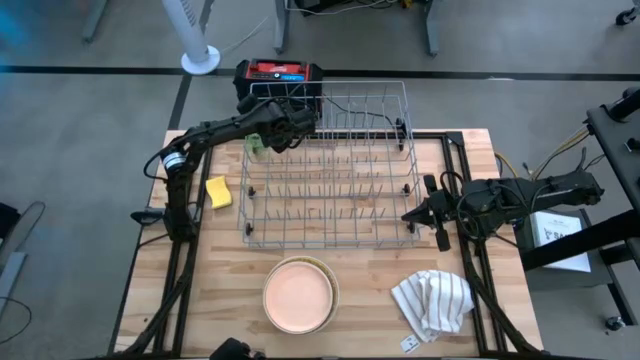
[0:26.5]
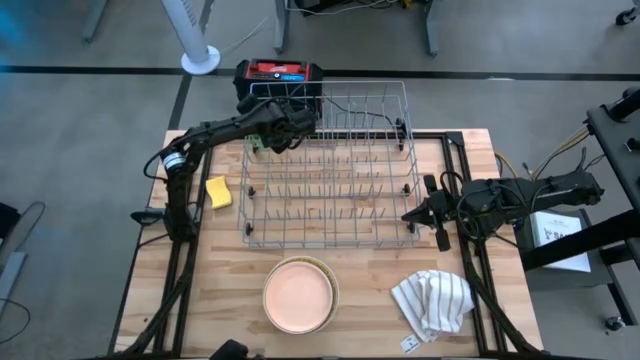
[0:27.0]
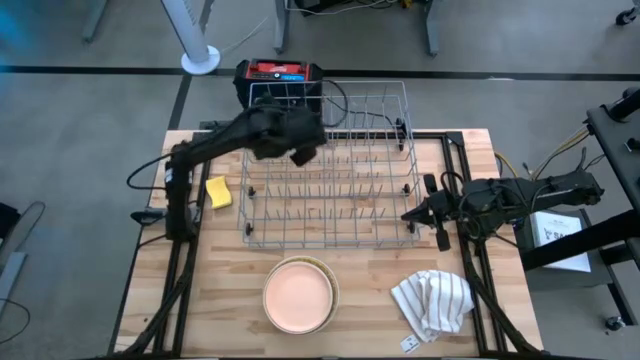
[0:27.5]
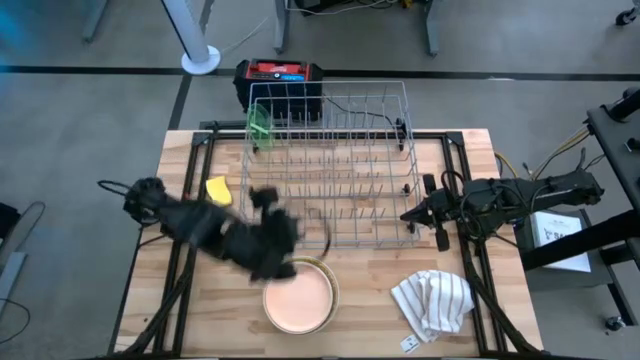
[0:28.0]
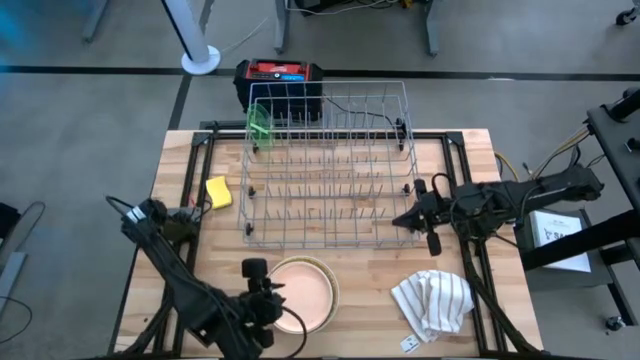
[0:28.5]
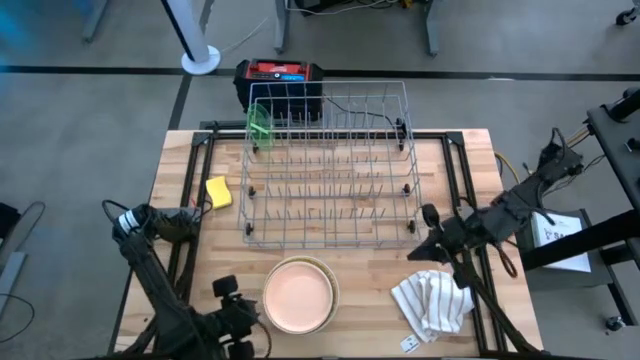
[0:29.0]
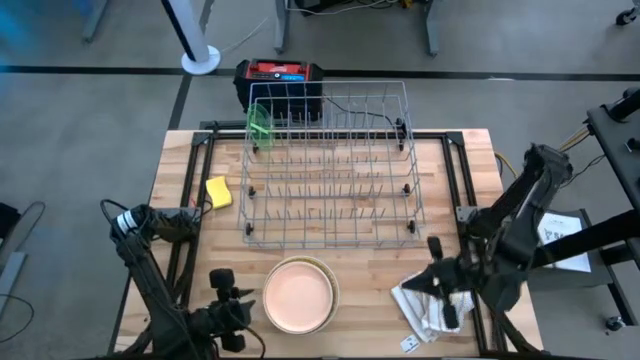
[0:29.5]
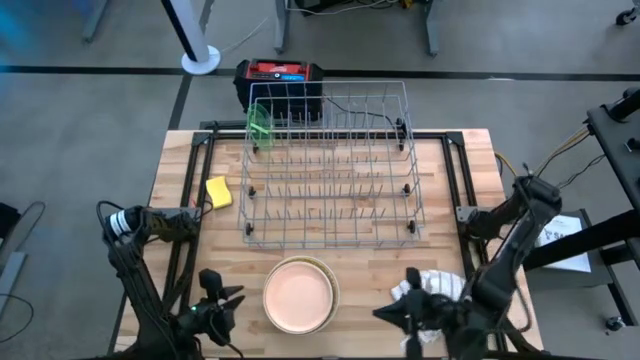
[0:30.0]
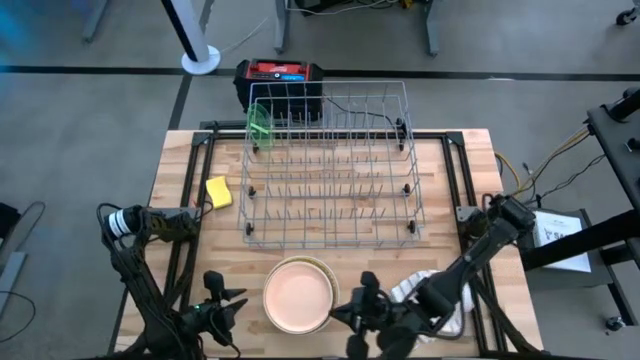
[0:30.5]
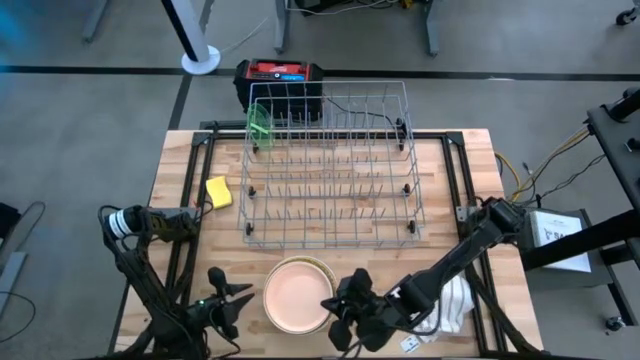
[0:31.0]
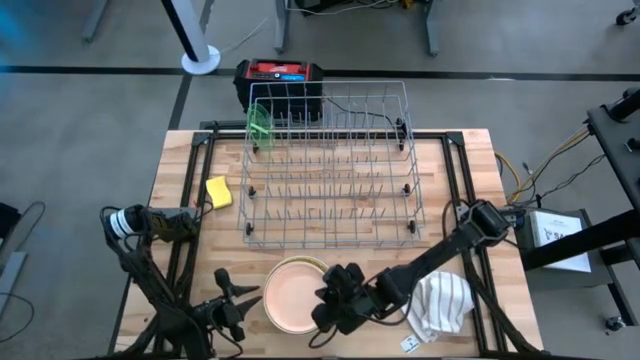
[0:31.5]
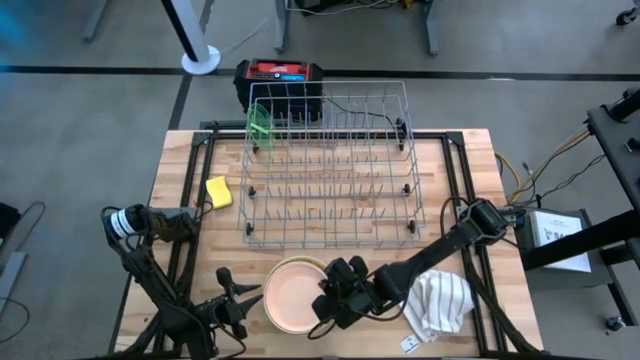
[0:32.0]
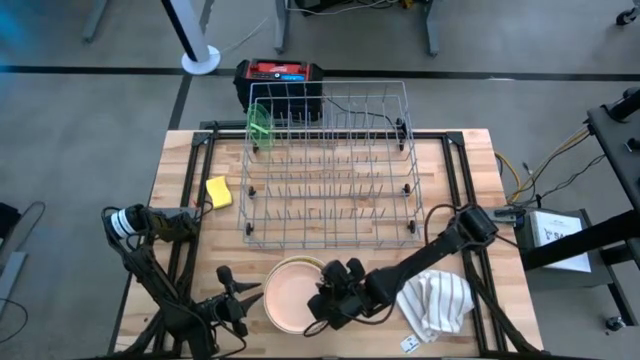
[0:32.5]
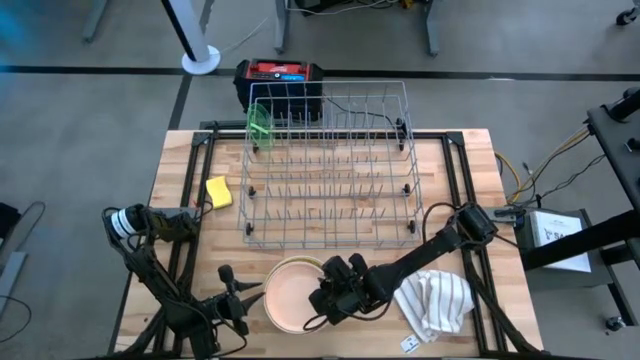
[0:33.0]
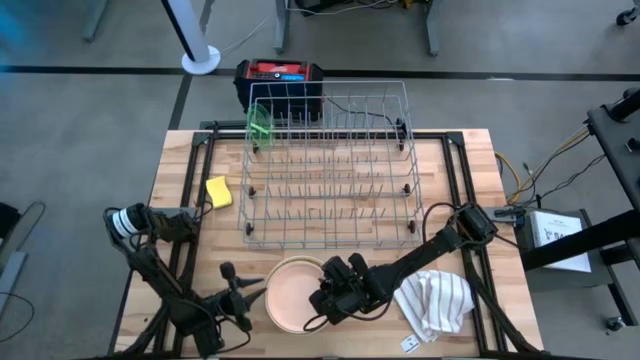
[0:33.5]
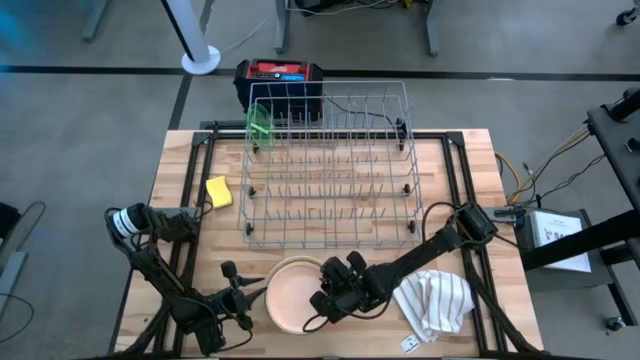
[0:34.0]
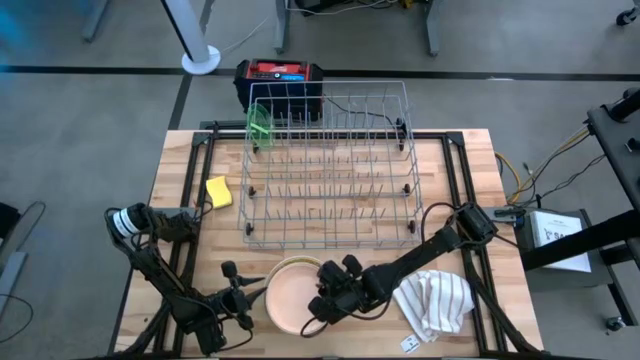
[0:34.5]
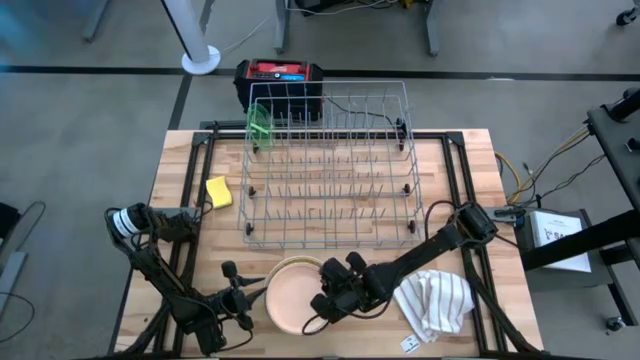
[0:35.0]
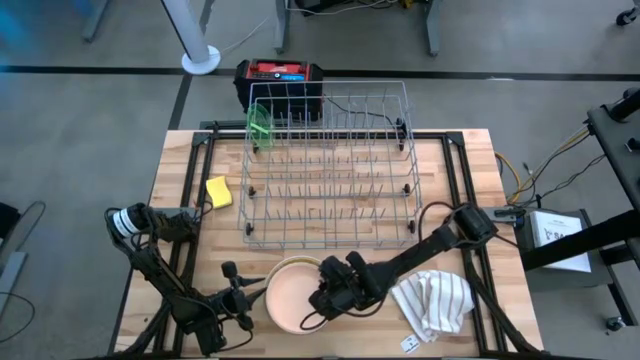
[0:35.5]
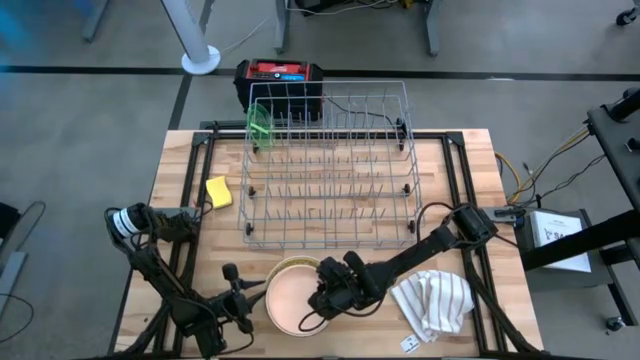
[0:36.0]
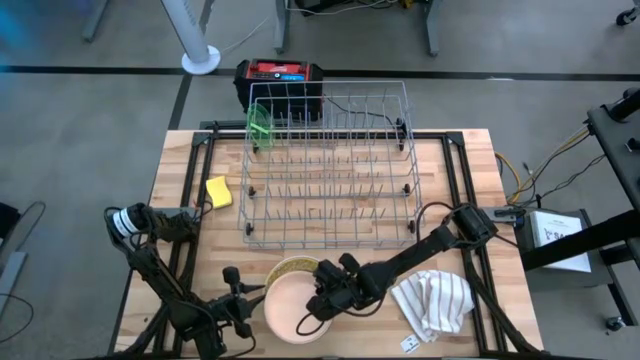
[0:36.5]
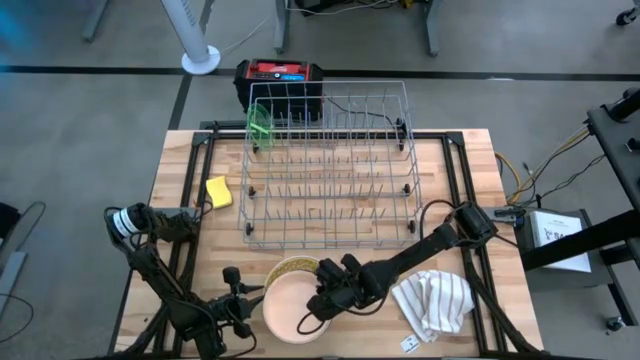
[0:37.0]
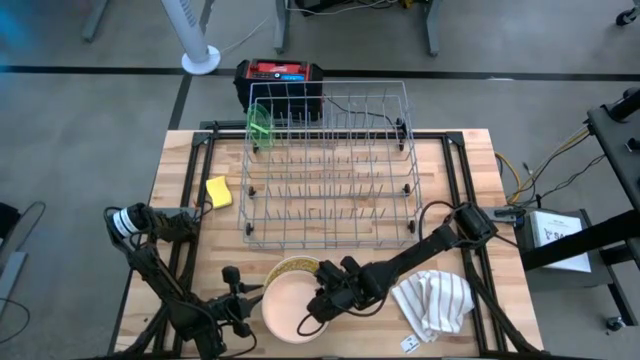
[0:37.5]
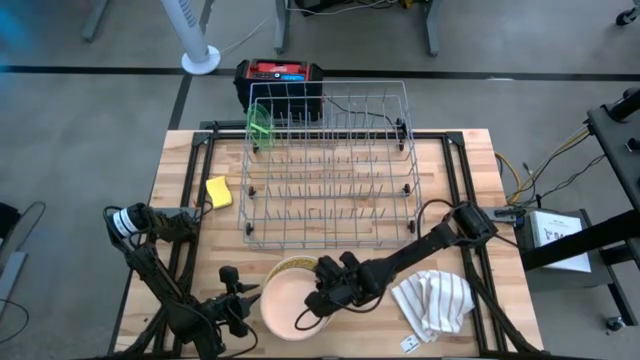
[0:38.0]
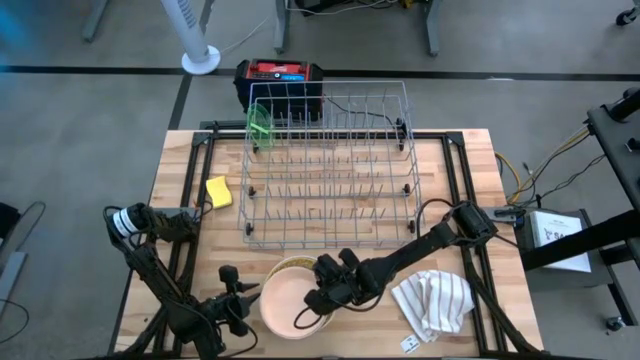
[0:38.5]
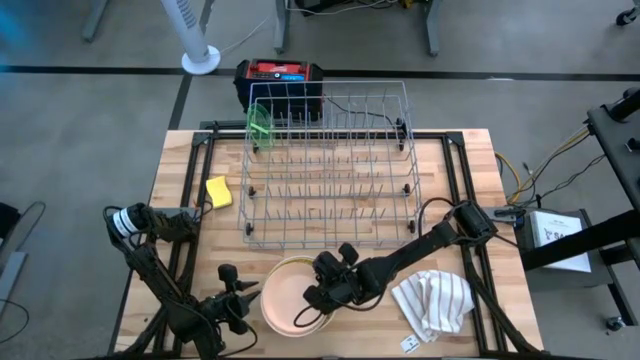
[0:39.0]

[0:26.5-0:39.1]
Task: Sort dishes
Put the light pink plate into the dish rack

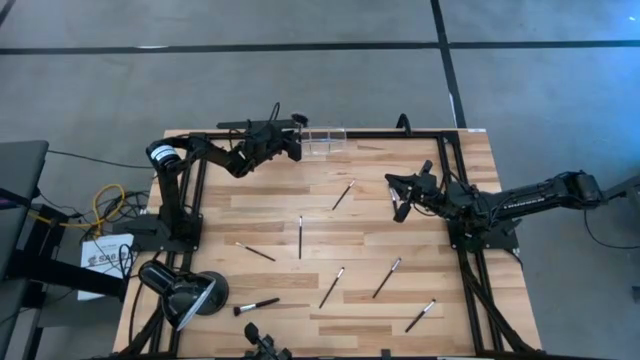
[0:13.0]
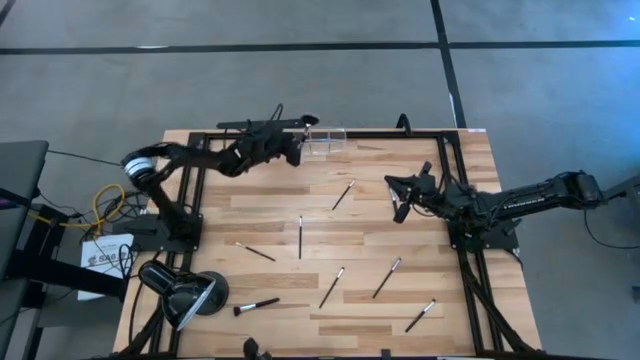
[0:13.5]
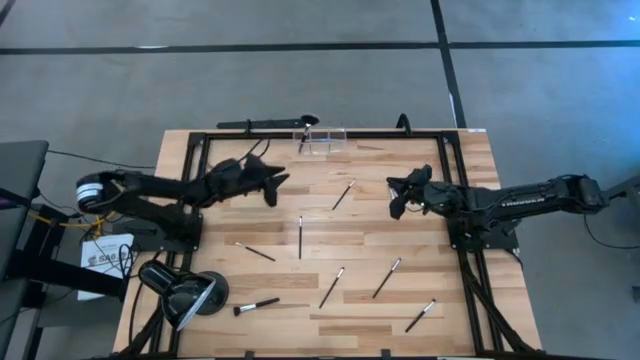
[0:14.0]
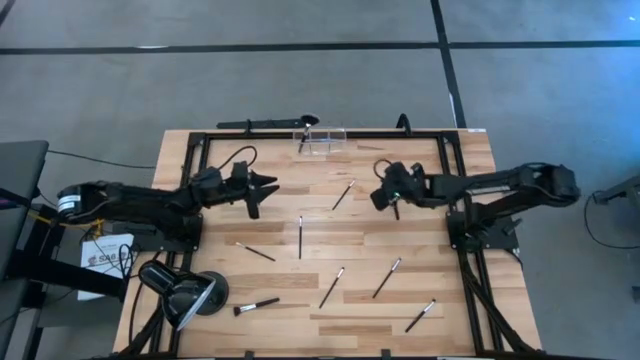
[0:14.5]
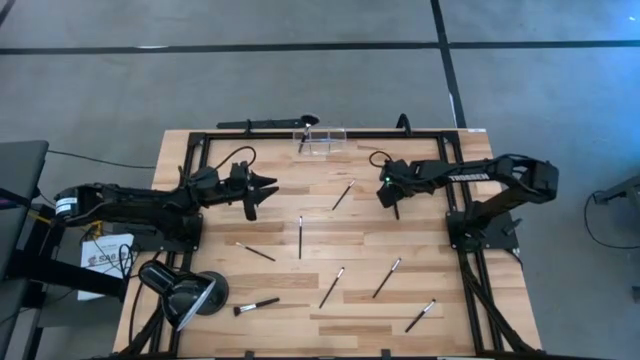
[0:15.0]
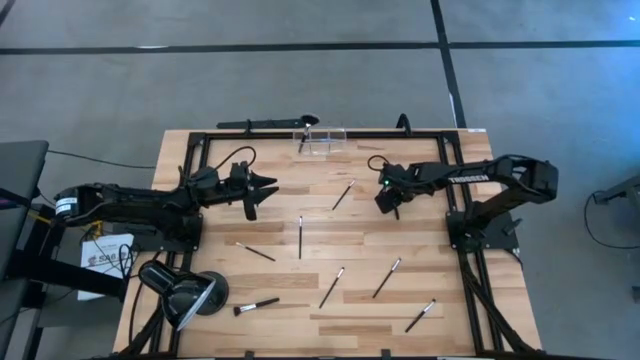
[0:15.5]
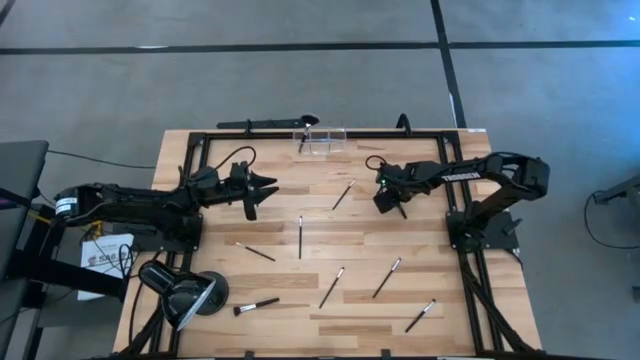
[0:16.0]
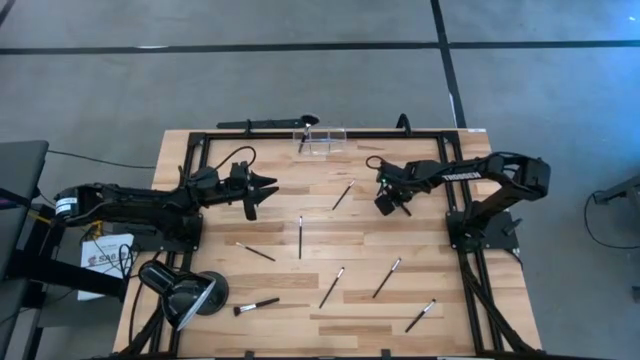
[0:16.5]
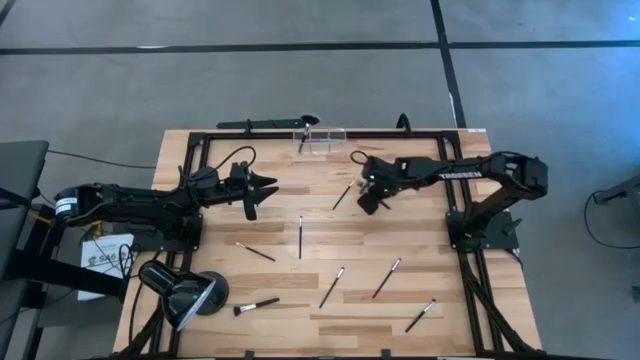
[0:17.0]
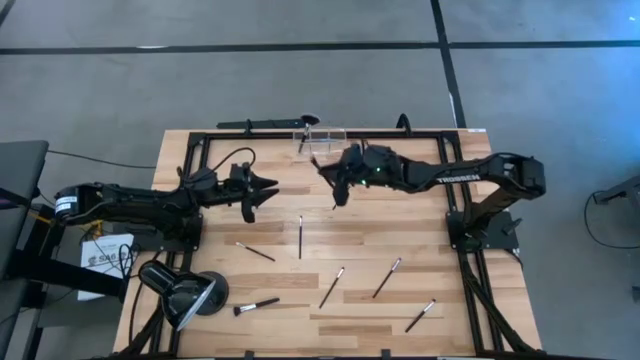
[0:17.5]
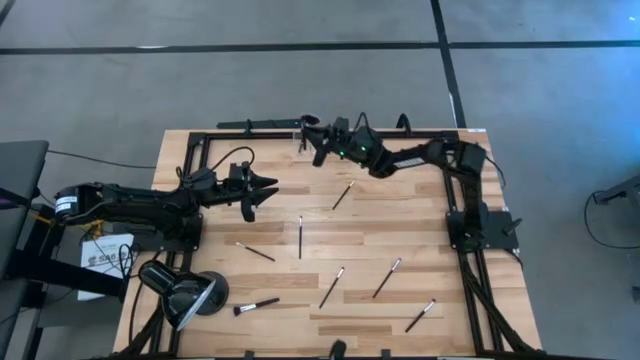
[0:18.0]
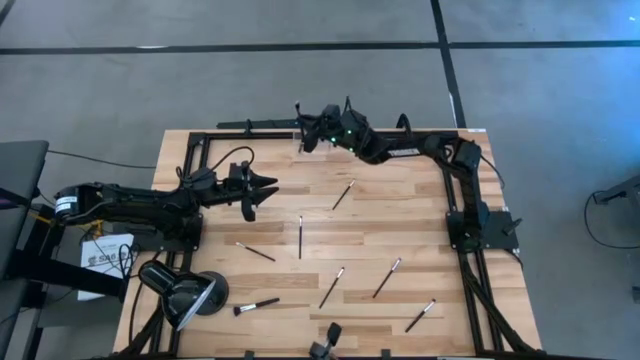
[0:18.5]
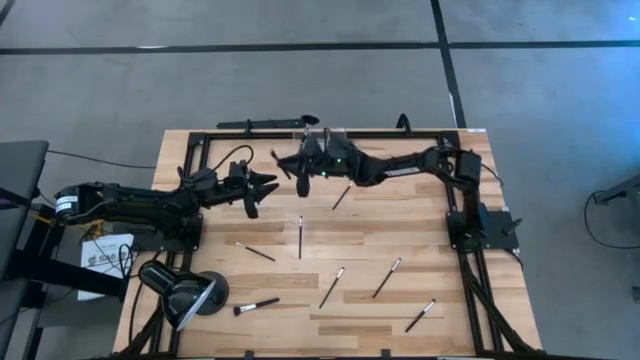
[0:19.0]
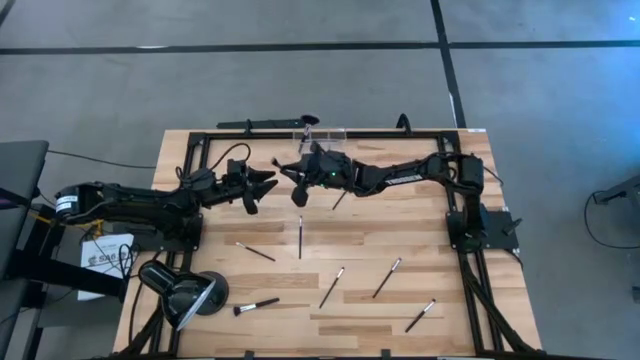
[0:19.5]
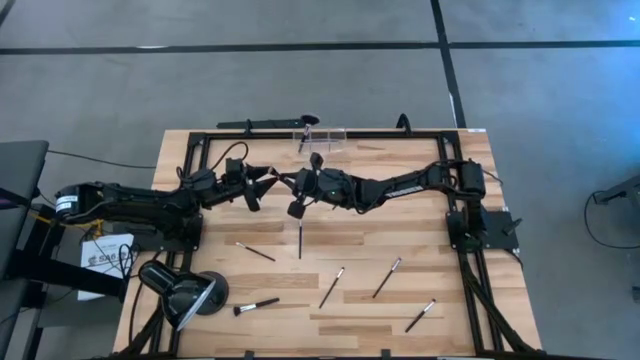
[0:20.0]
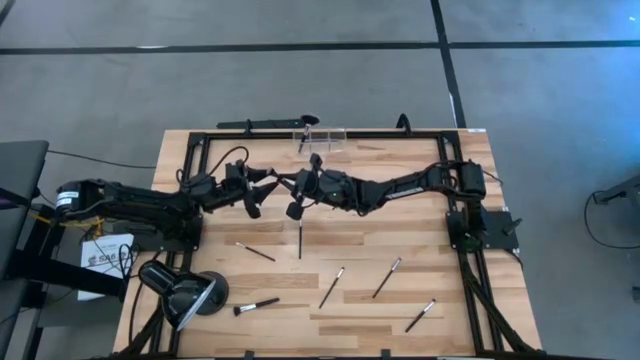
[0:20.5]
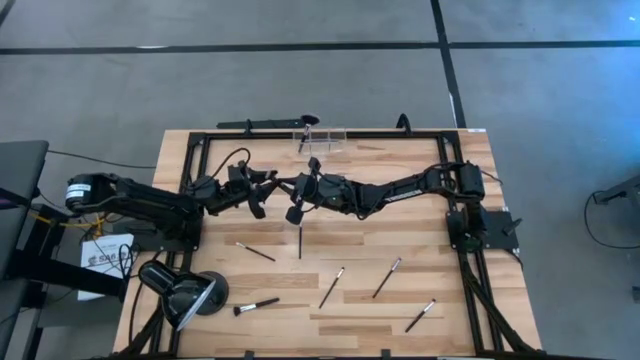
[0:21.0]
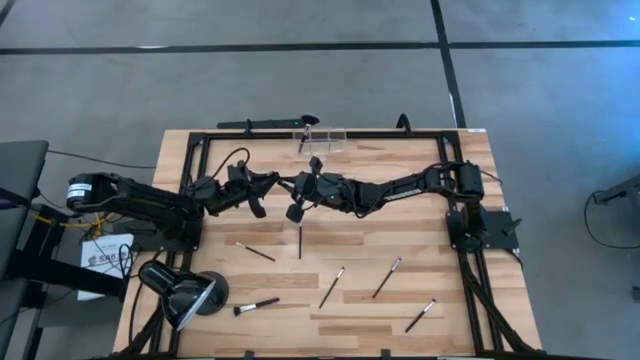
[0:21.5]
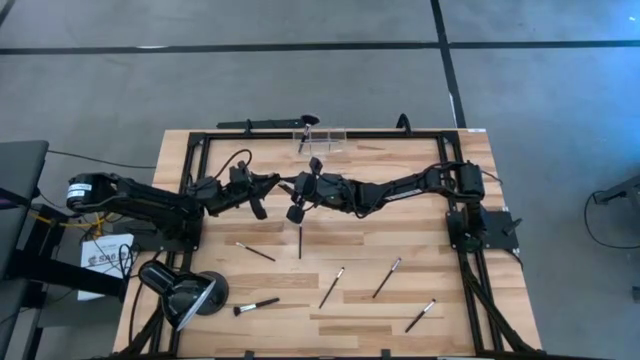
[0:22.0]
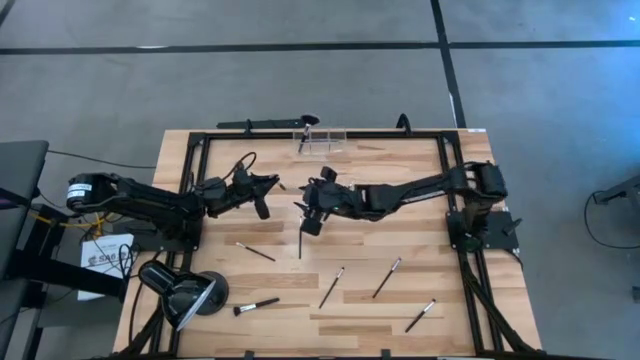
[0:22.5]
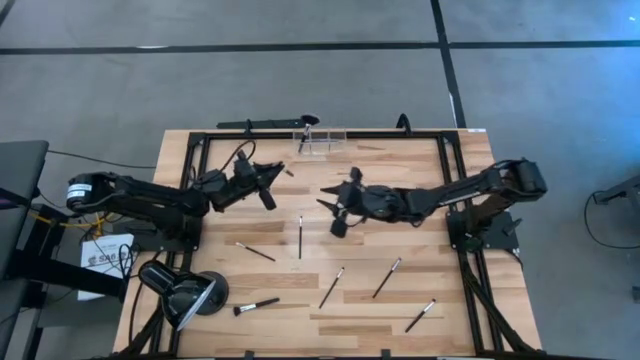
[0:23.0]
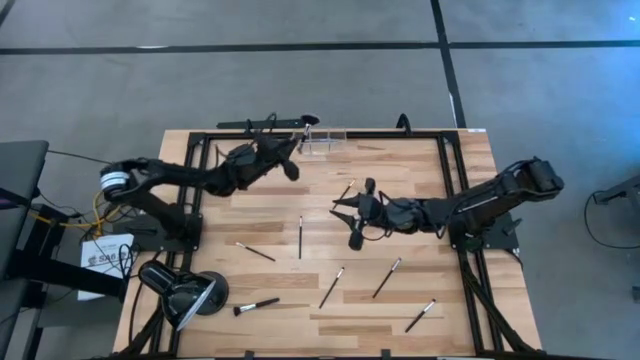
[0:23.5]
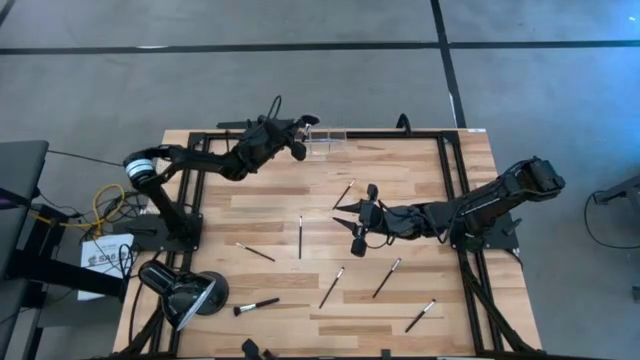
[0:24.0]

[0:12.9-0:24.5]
Task: Sort items
Put the blush brush into the left section of the transparent organizer
